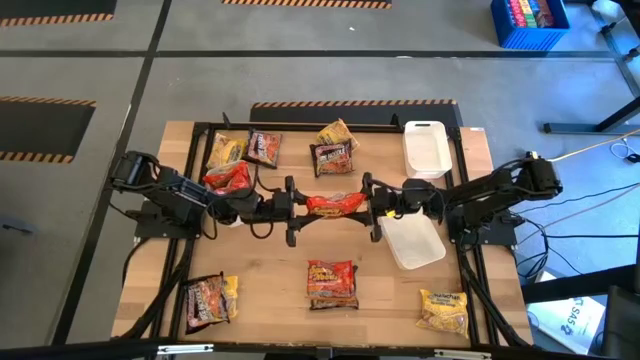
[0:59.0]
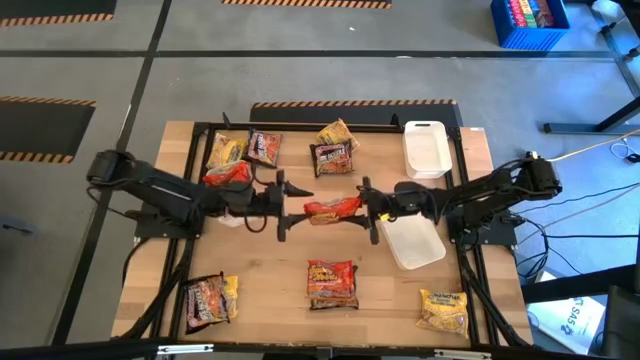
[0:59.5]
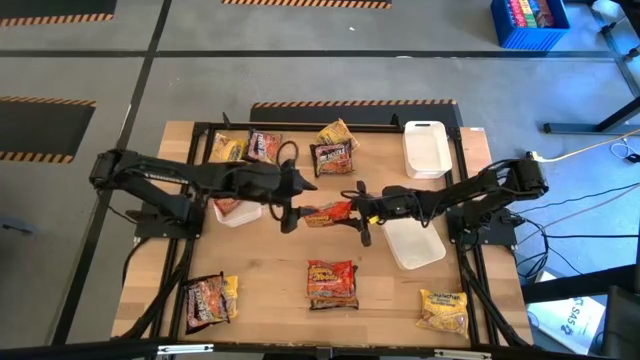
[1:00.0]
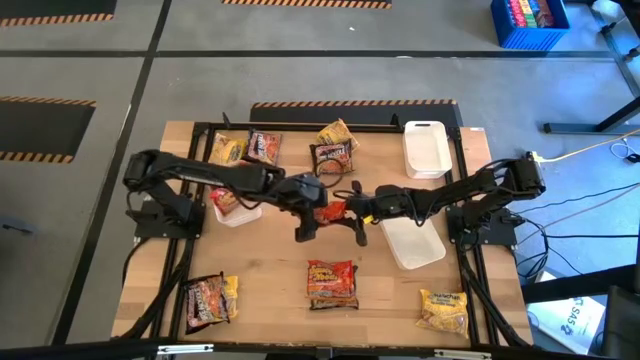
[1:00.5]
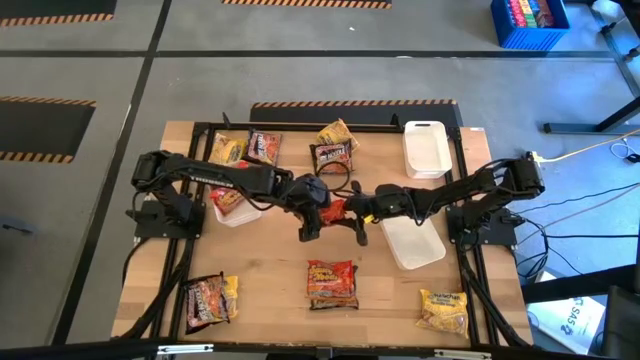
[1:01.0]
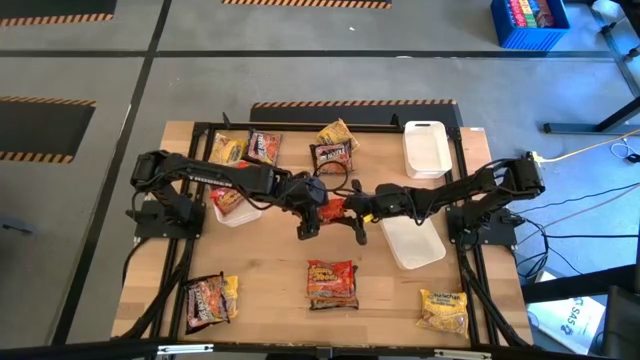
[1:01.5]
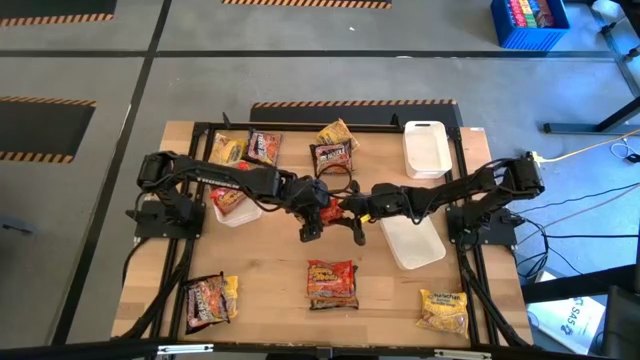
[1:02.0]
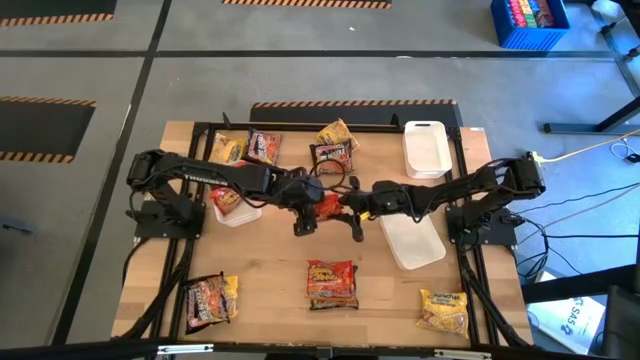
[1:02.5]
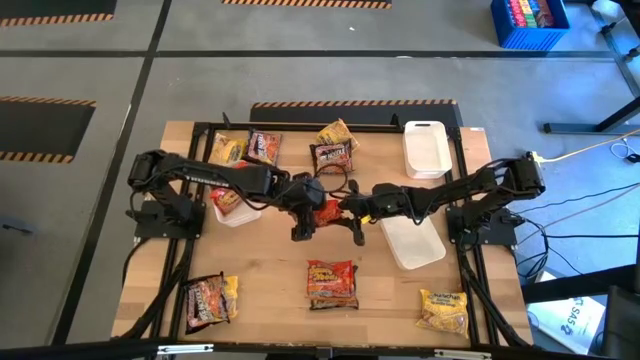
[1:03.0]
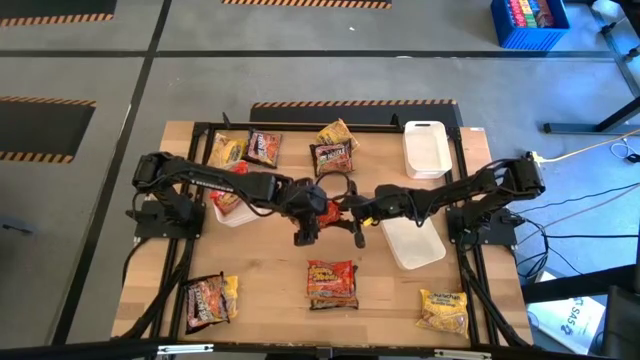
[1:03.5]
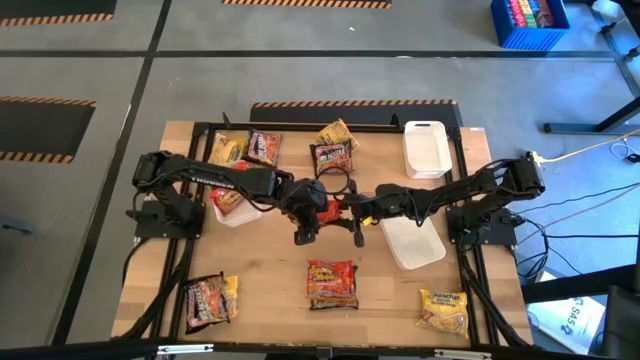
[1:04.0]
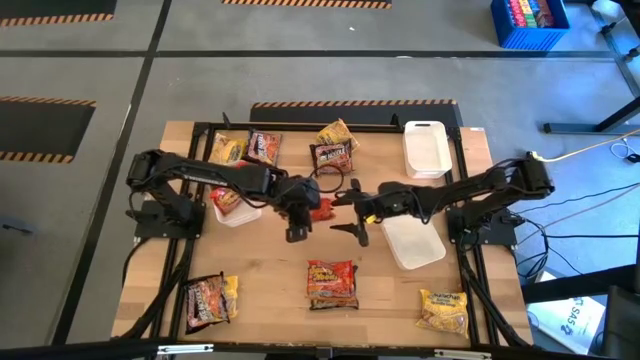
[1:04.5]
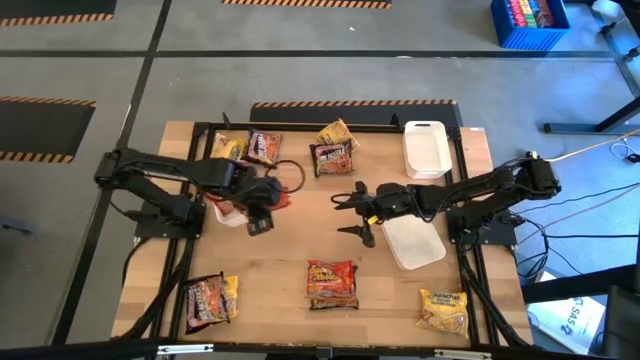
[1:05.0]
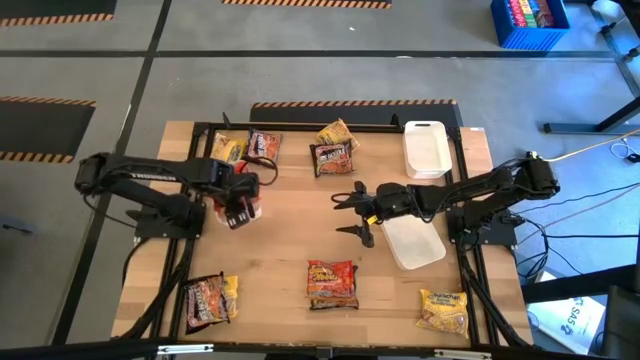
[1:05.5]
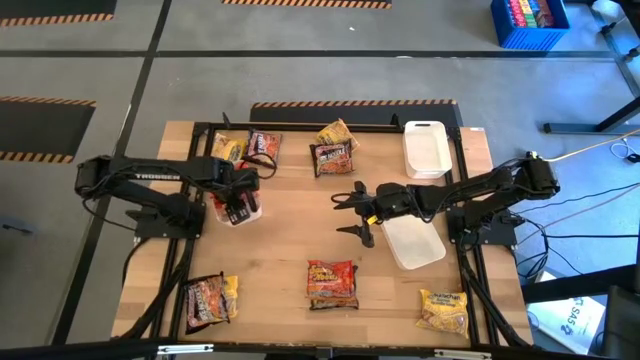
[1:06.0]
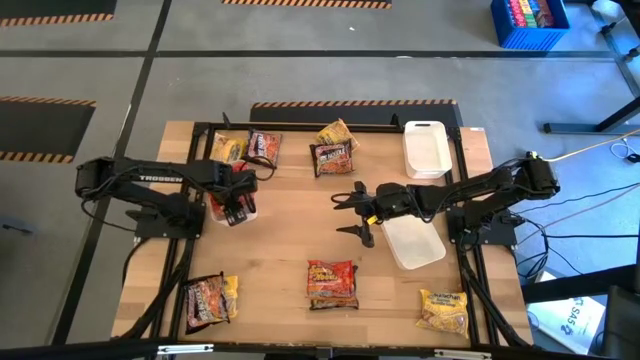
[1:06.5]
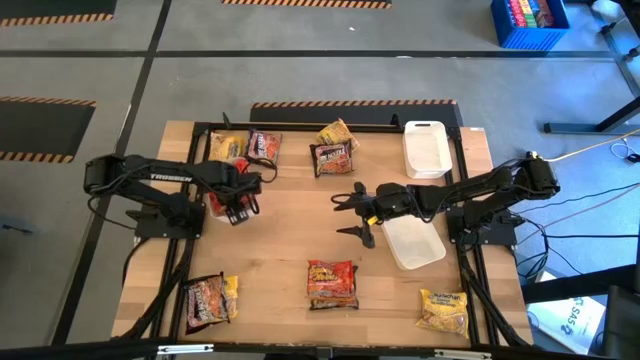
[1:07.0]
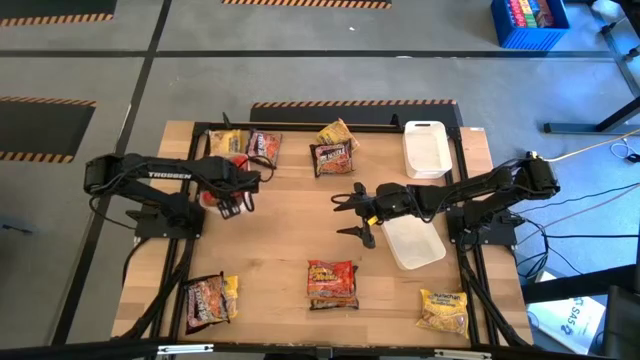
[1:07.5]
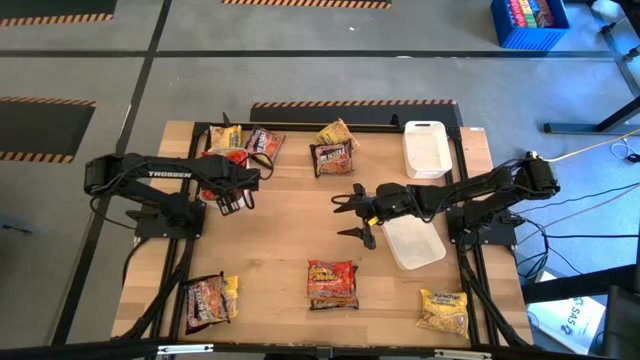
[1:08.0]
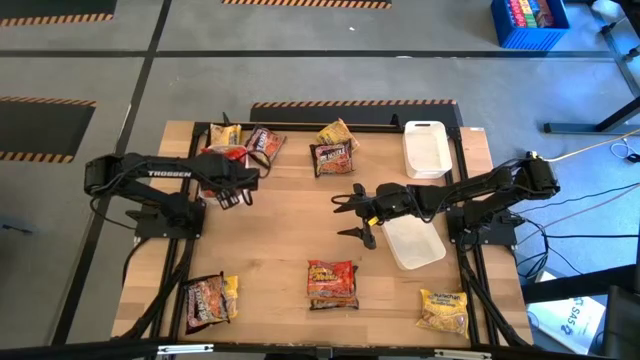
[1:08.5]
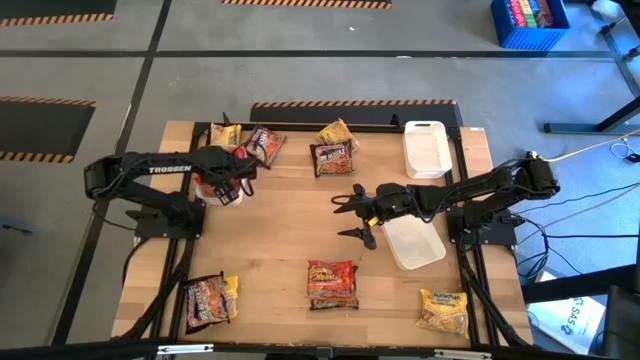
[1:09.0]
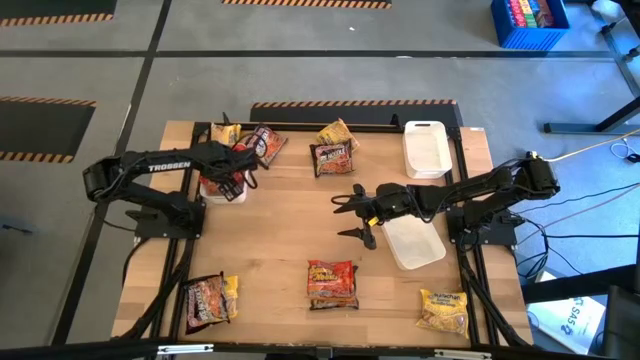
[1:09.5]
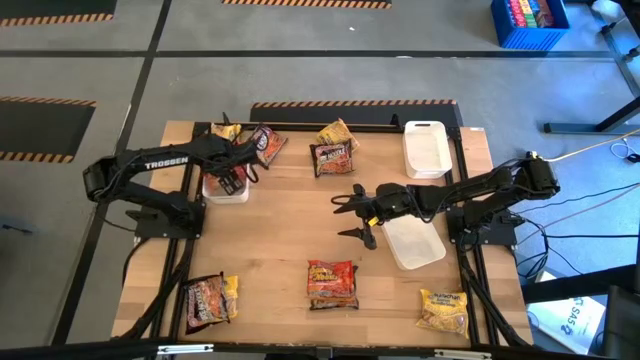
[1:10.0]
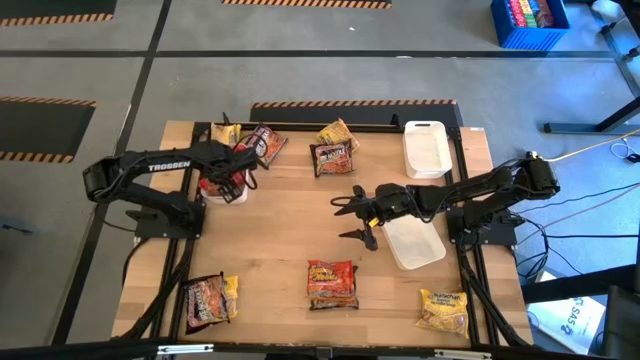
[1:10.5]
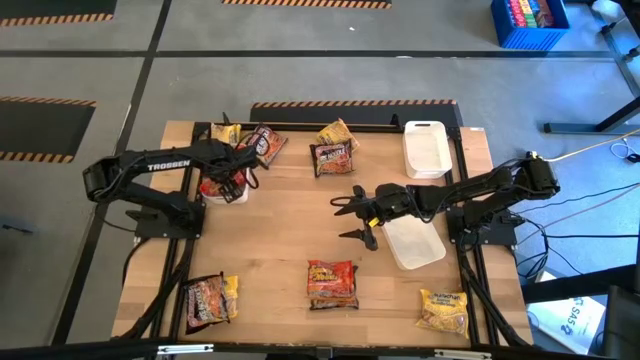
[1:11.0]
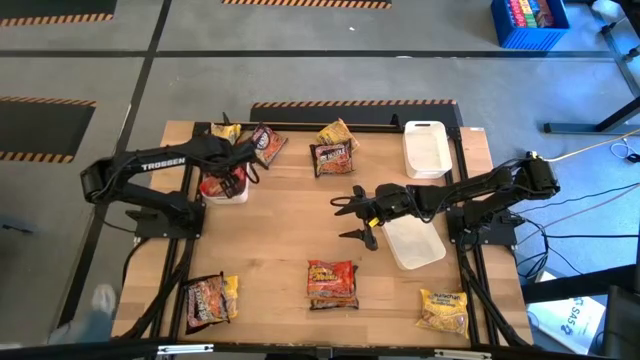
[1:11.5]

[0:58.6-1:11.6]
Task: Sort Maruchan noodles
Put the right orange noodle into the left white bin

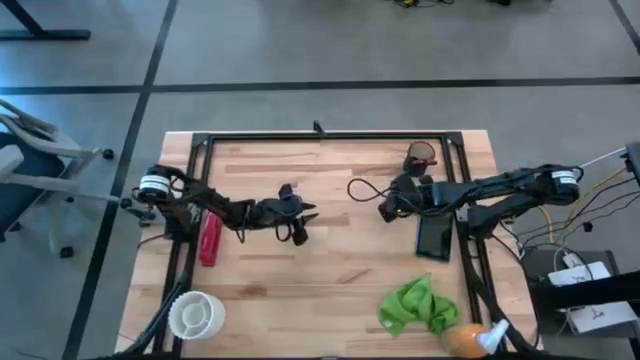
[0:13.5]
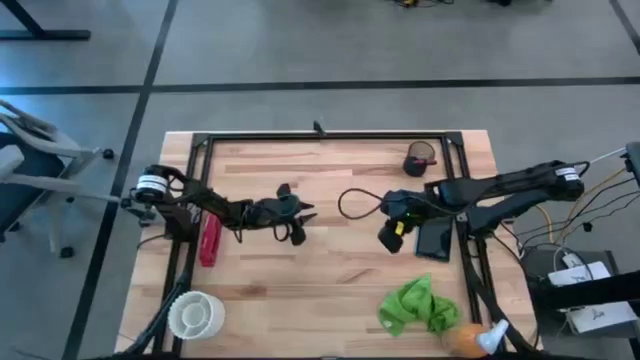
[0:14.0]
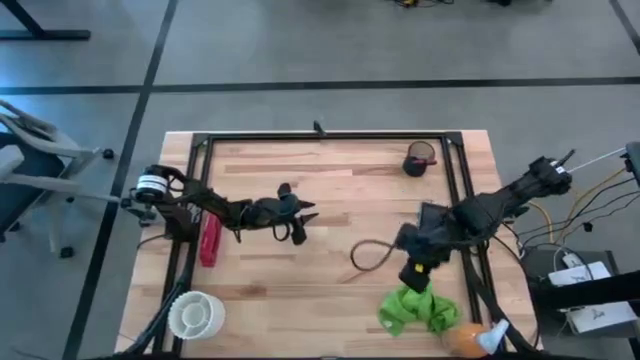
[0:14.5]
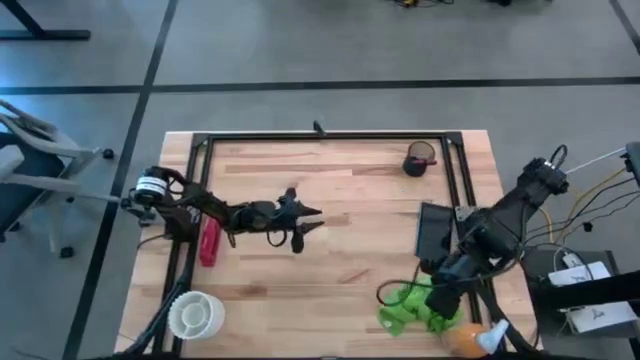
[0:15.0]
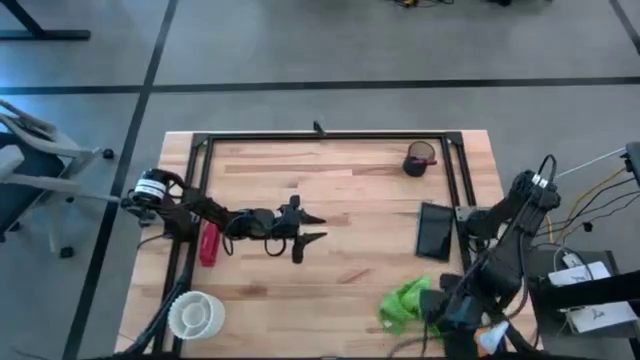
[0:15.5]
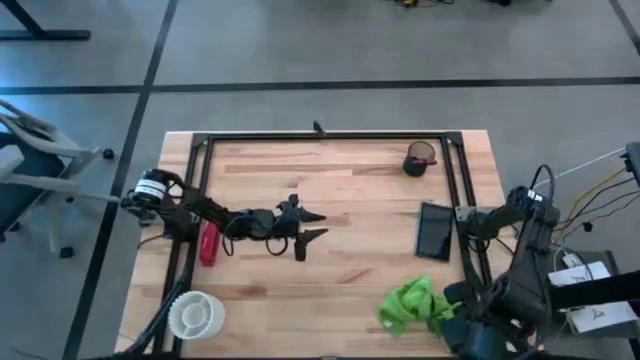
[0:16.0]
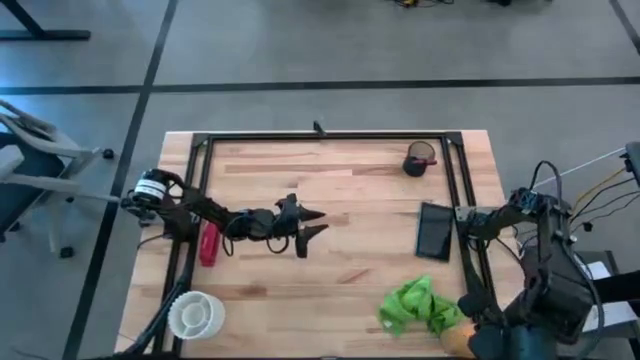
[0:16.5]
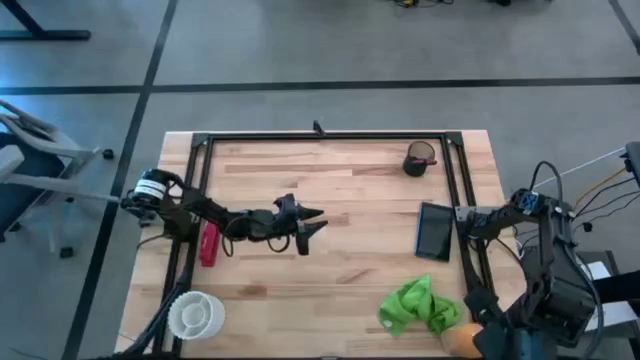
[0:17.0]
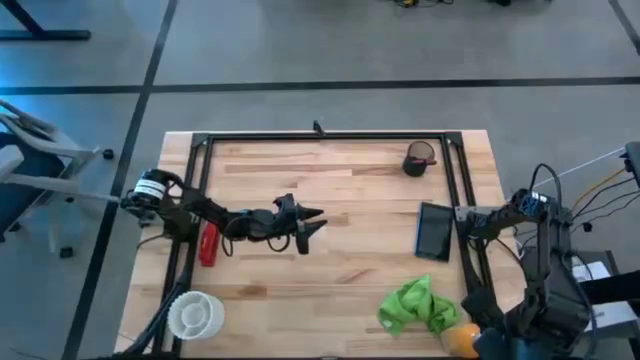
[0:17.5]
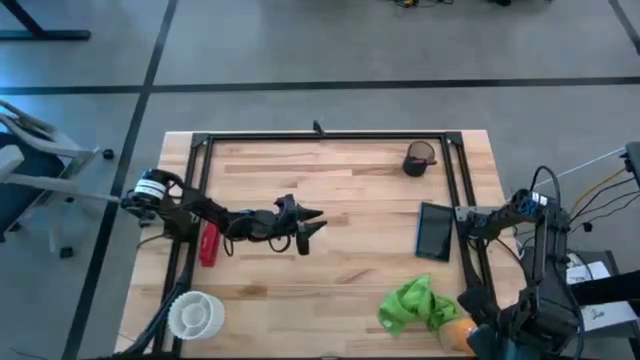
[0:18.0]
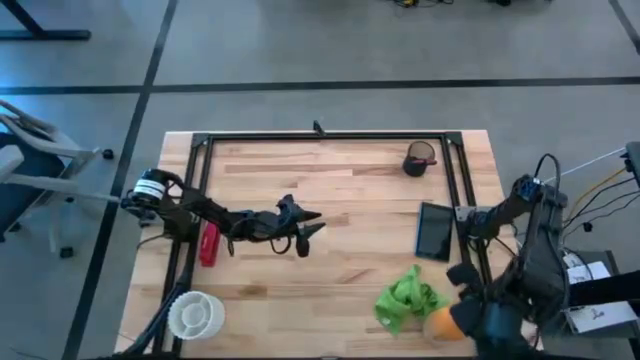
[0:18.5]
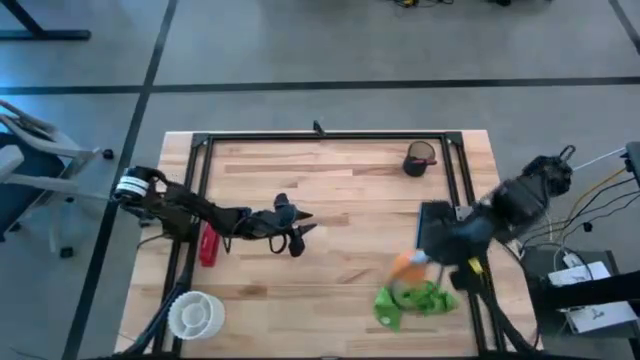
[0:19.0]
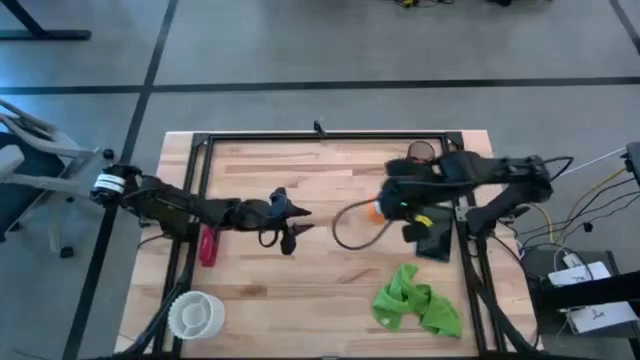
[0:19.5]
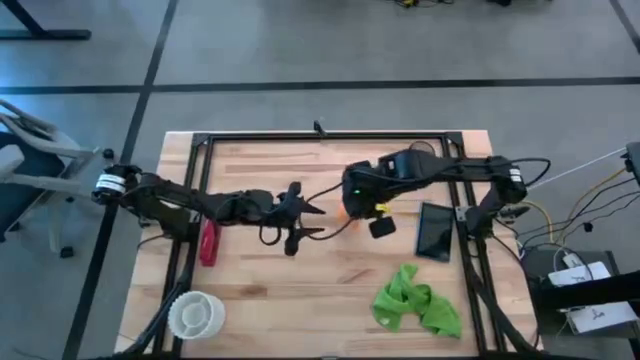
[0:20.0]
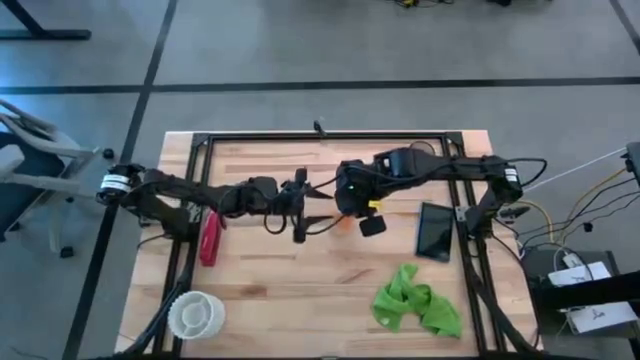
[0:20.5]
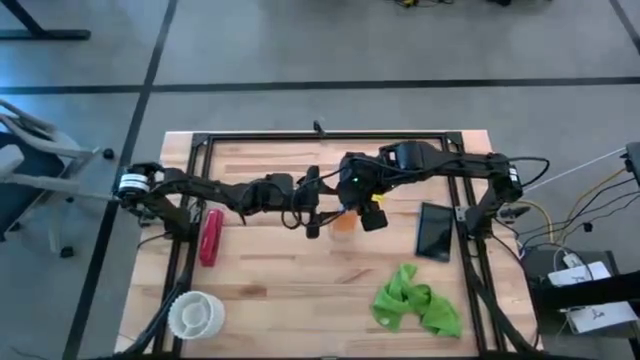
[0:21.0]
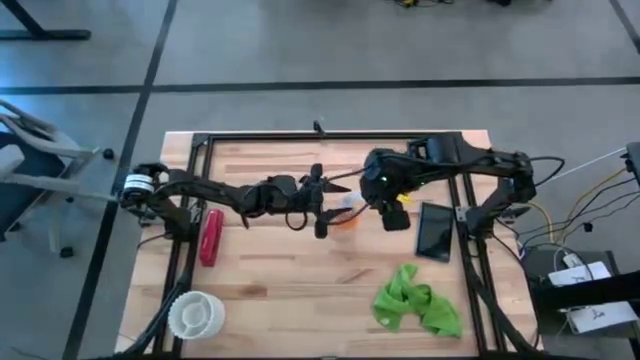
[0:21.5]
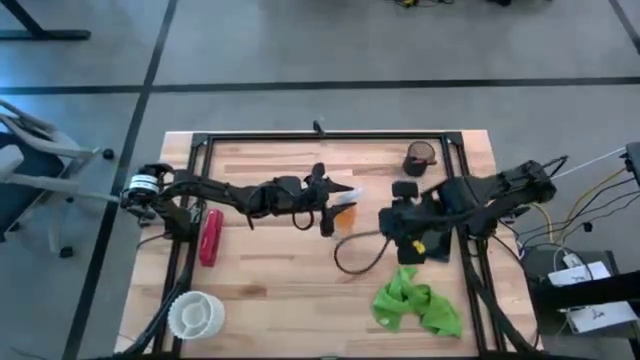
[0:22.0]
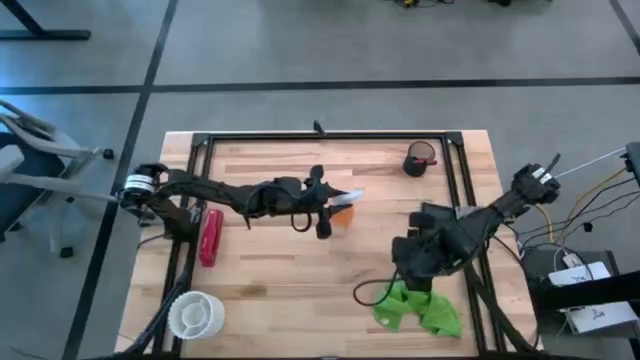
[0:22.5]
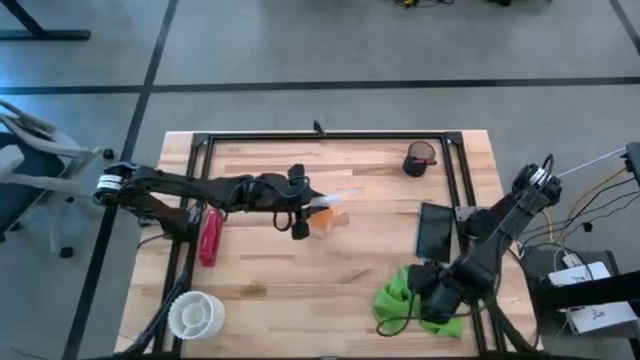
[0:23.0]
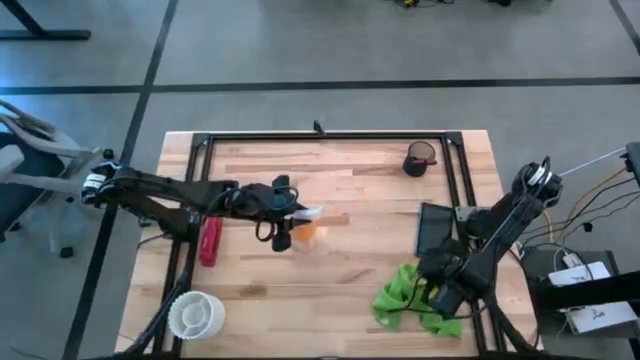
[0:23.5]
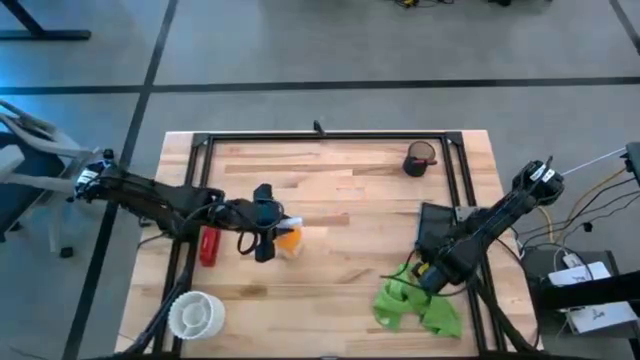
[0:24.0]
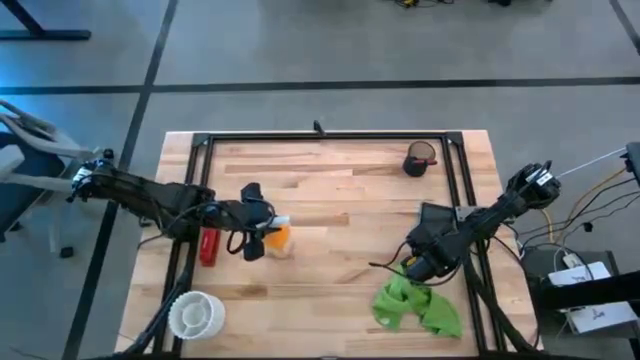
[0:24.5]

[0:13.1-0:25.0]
Task: Apply microfiber cloth
Move the yellow spray bottle to the middle center of the table
